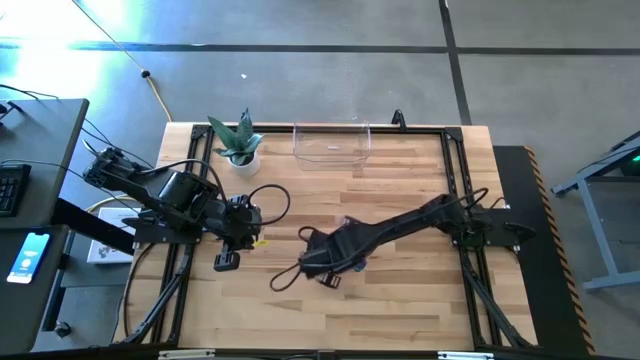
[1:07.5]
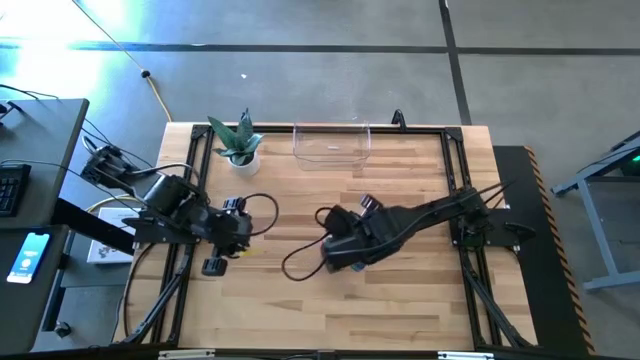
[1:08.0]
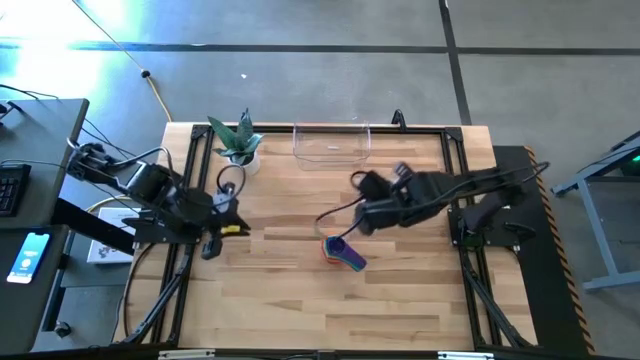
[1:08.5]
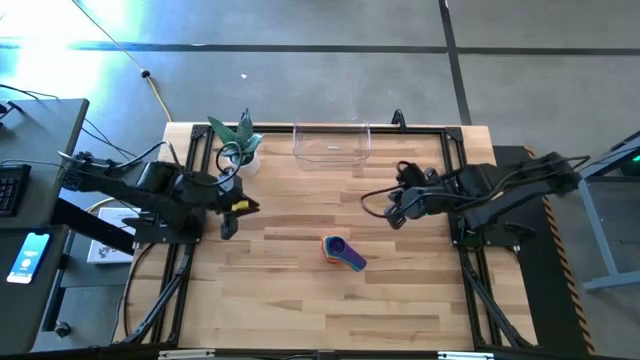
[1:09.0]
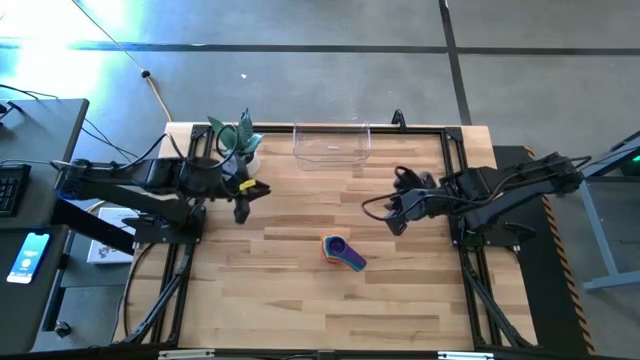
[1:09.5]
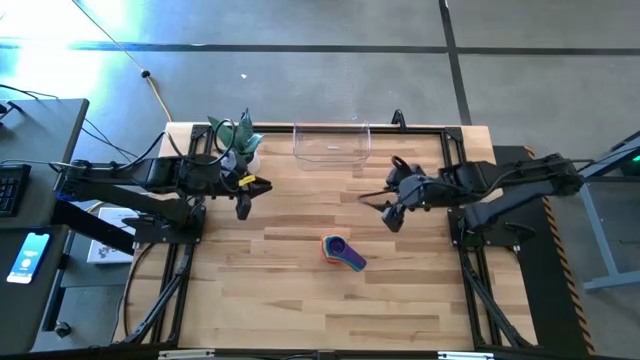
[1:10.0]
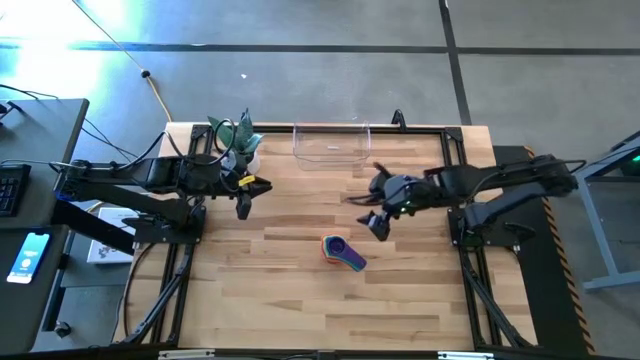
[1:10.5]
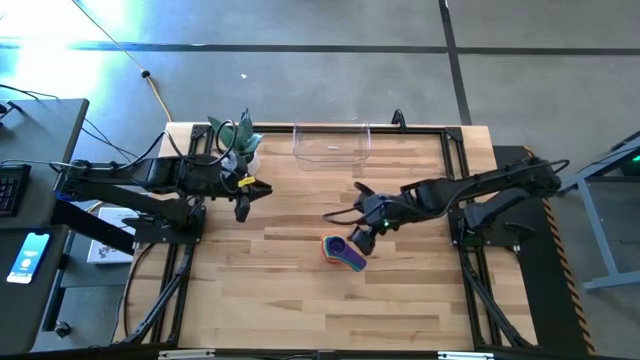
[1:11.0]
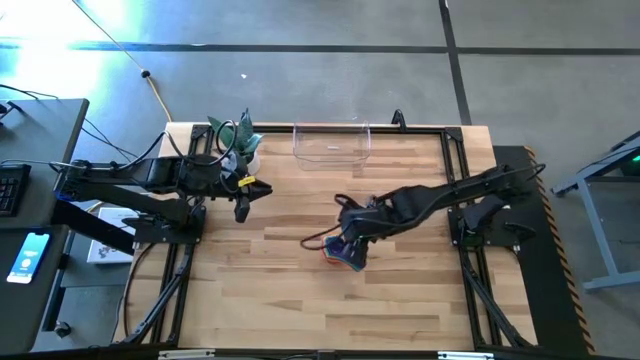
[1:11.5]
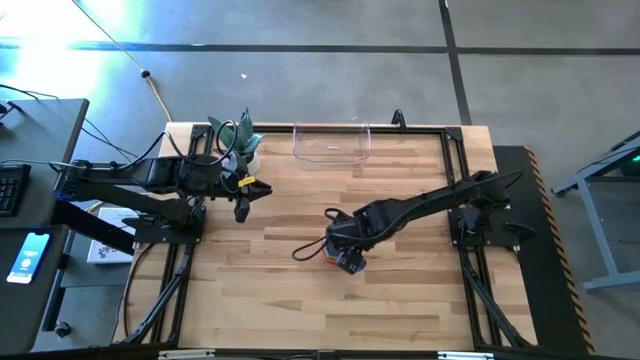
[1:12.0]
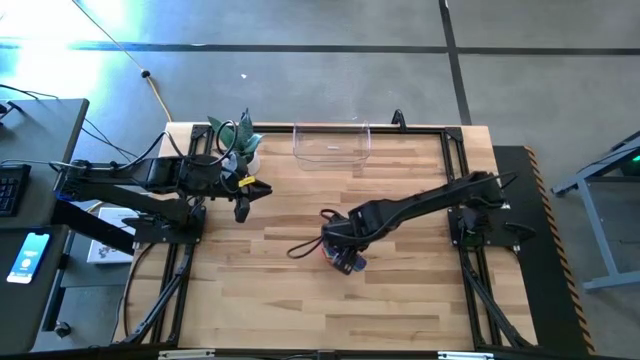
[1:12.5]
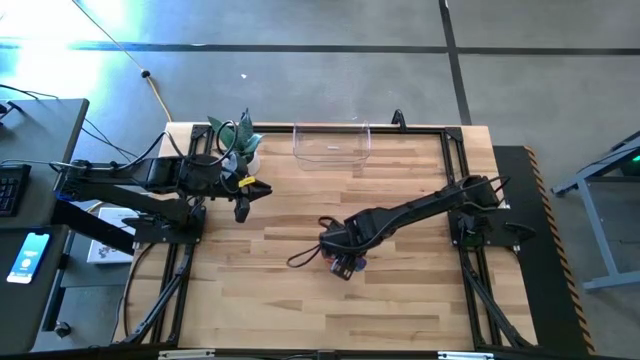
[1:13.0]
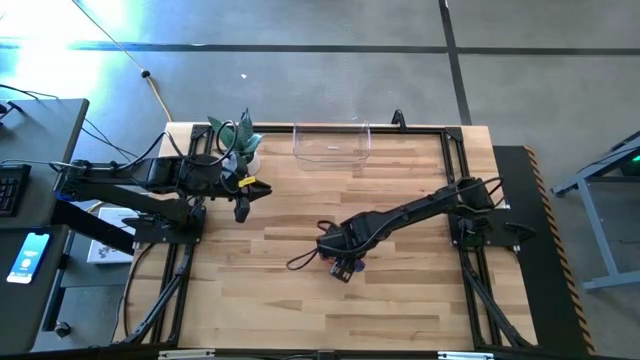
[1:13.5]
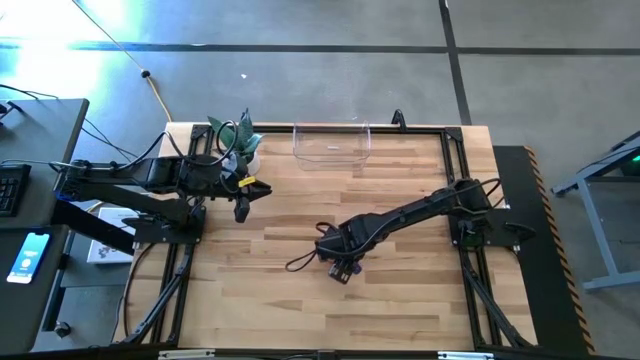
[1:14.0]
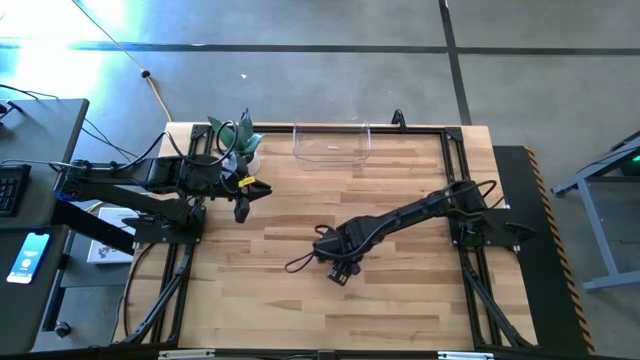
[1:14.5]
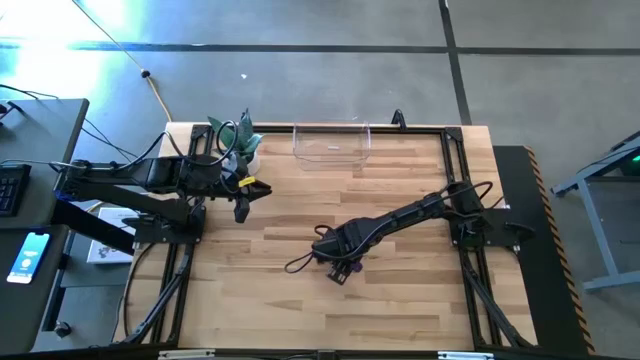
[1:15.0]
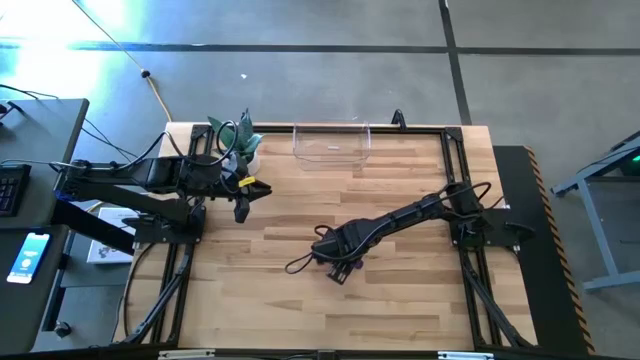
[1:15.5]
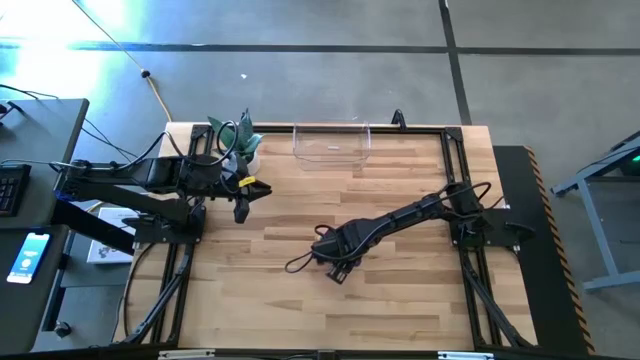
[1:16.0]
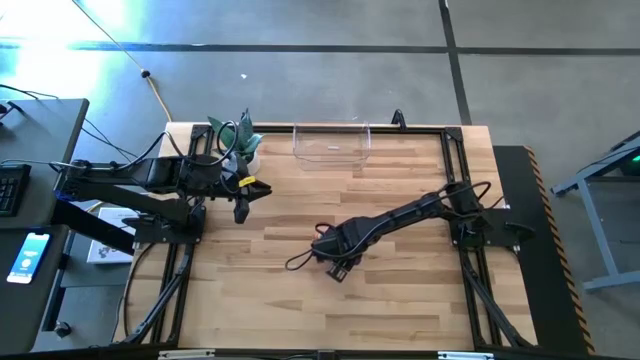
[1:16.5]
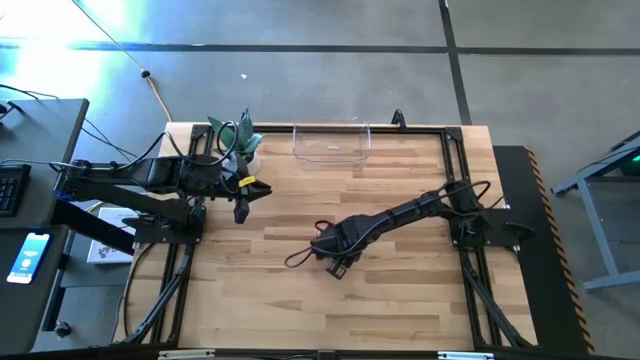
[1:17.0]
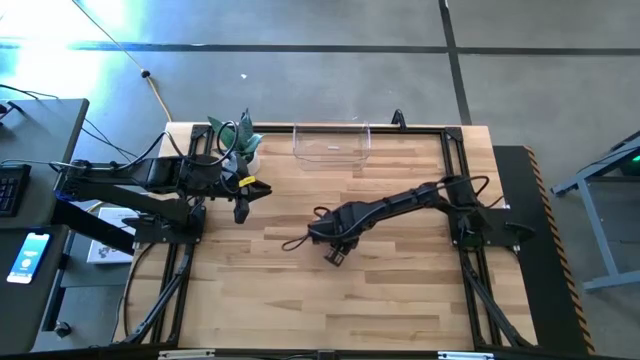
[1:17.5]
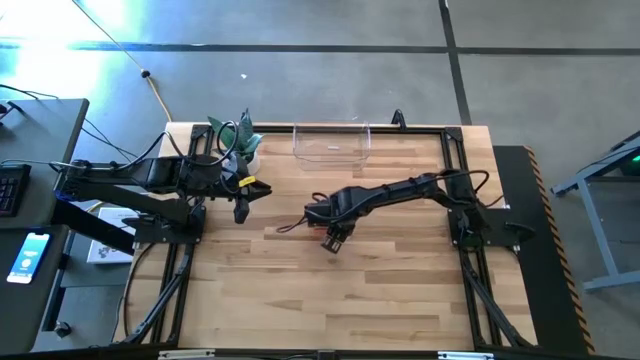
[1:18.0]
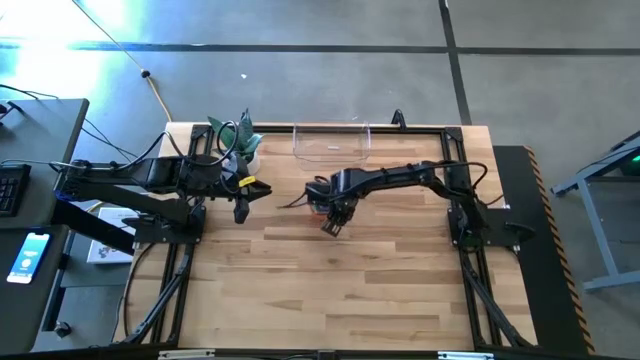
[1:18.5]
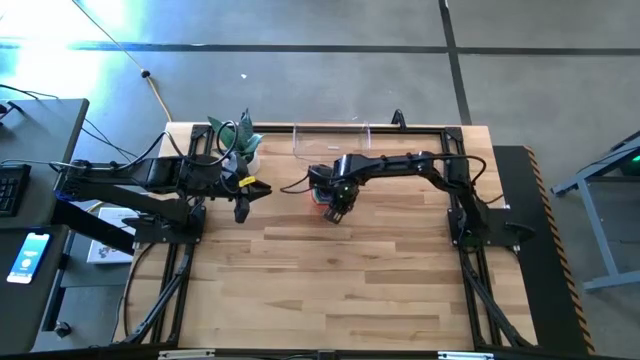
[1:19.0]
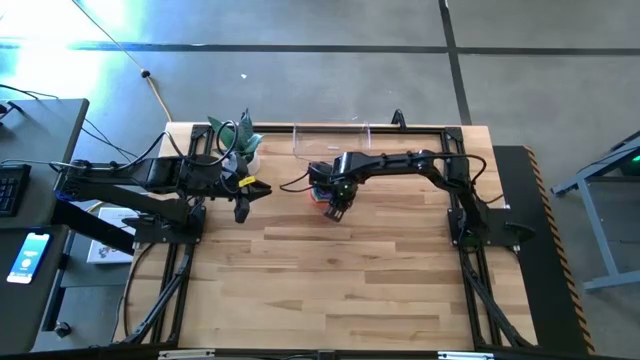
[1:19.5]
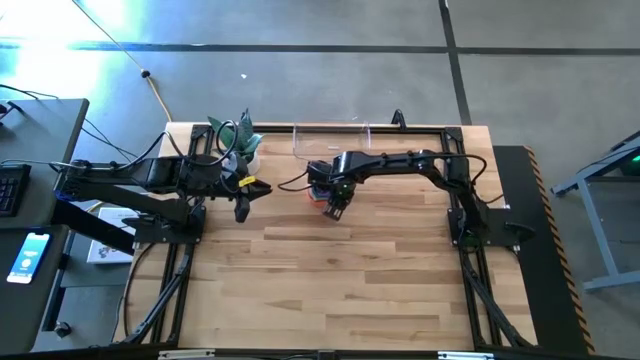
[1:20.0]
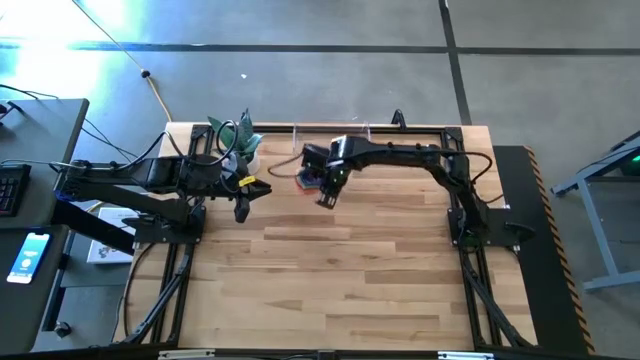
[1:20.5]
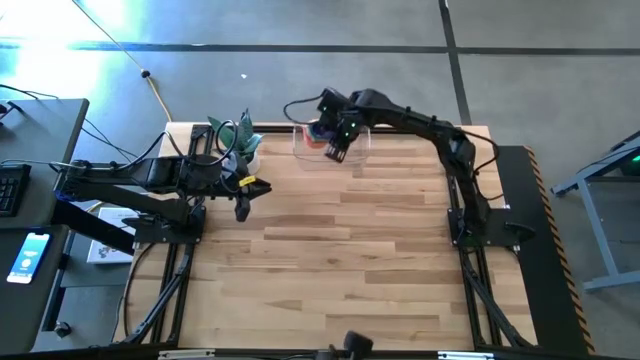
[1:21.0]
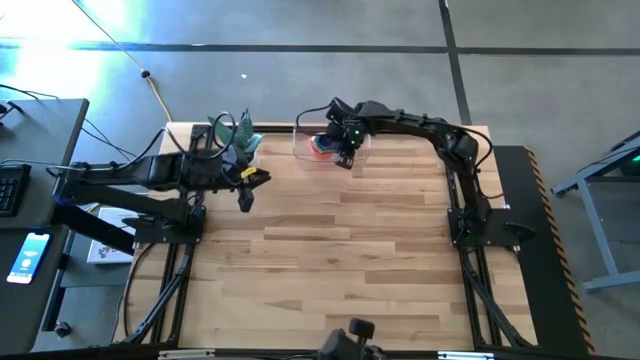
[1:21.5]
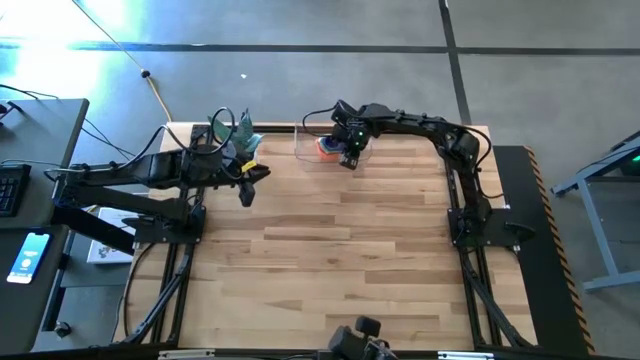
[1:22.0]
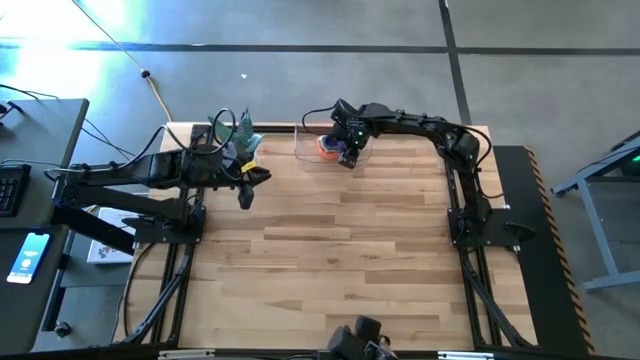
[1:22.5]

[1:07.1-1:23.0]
Task: Nest measuring cups in basket
Put the stack of measuring cups into the transparent bin

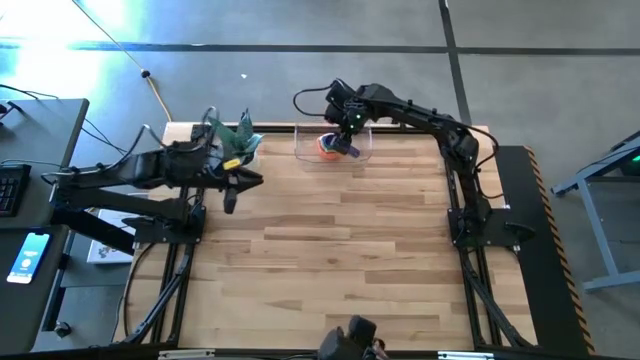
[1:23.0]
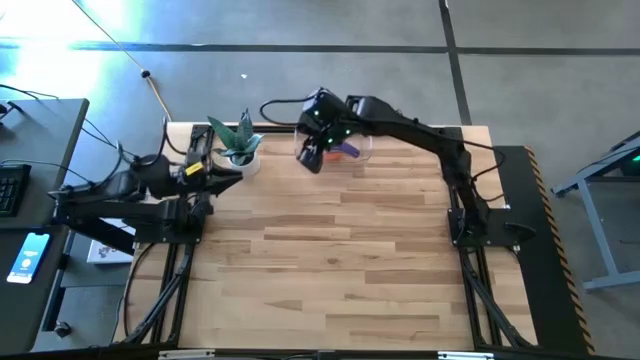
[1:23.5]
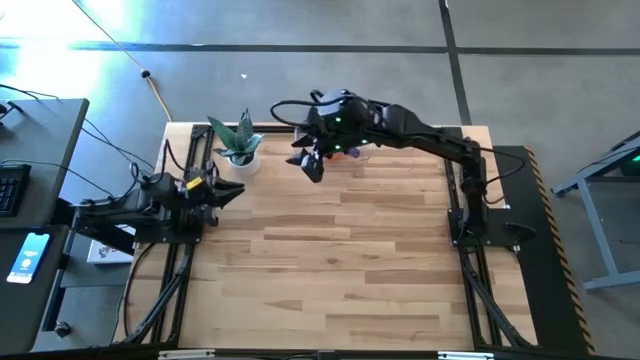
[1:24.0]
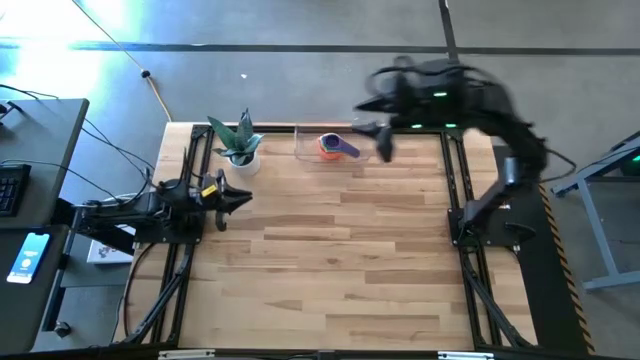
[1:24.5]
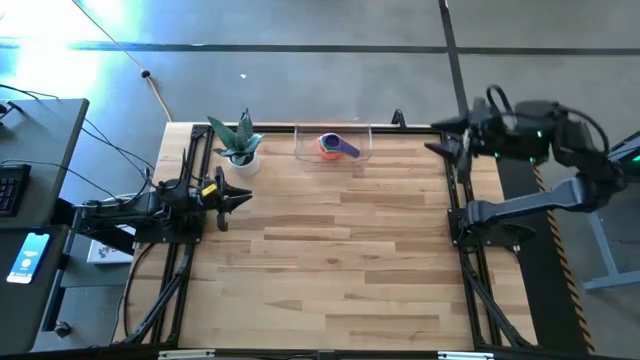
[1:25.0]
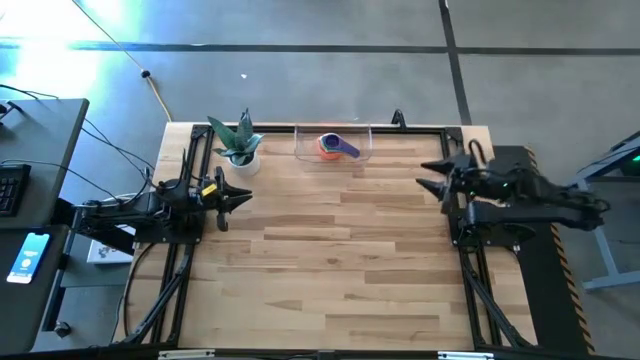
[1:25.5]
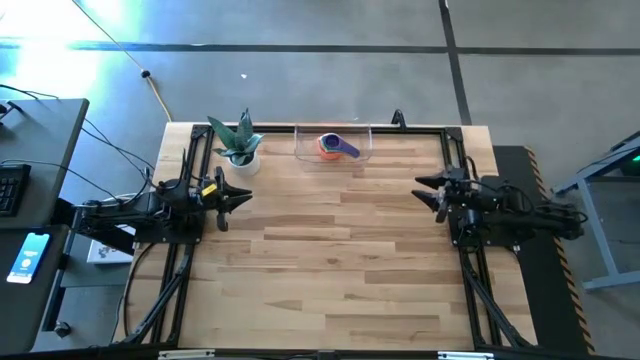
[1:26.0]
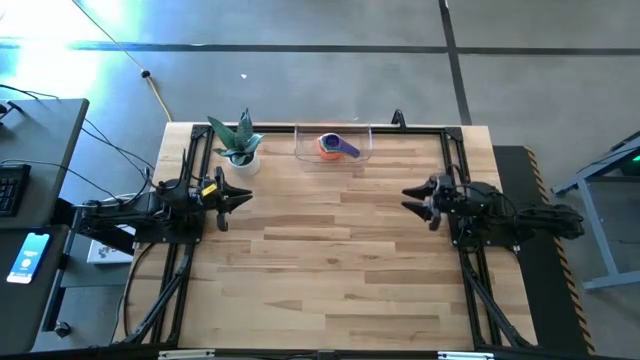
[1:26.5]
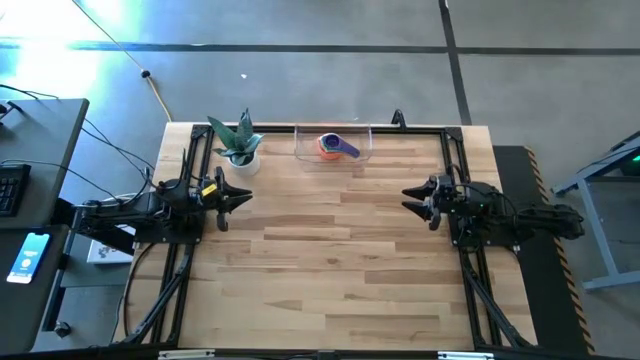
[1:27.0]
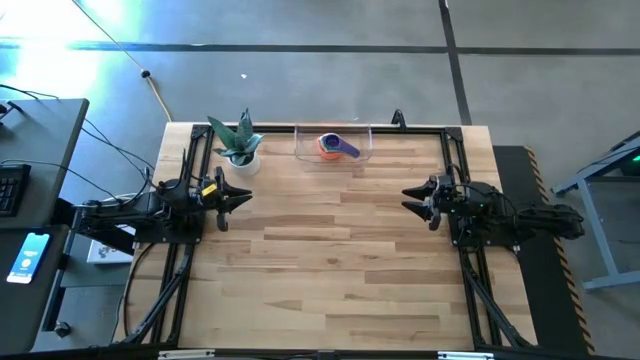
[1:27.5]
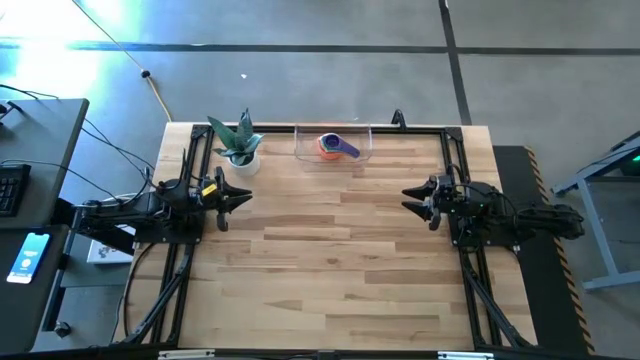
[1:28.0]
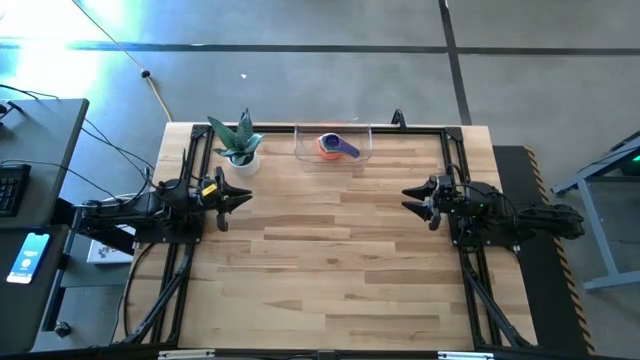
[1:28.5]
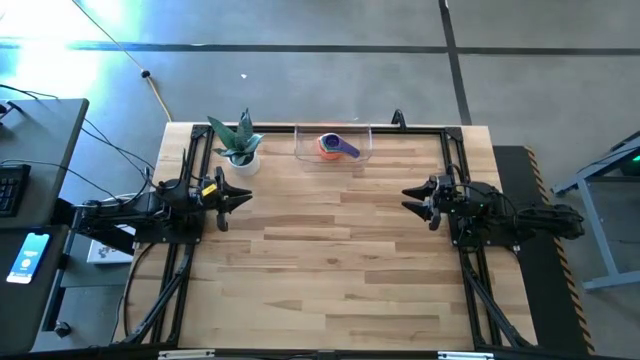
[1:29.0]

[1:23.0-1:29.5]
Return to Home Position
